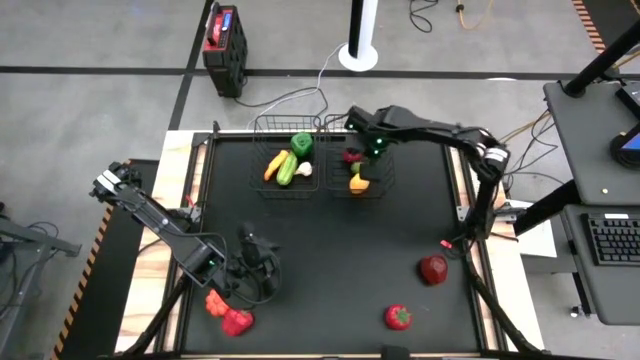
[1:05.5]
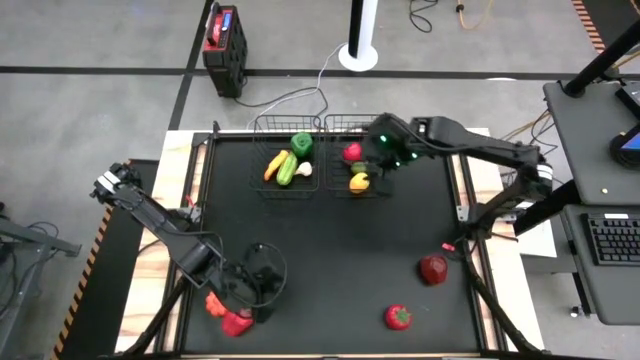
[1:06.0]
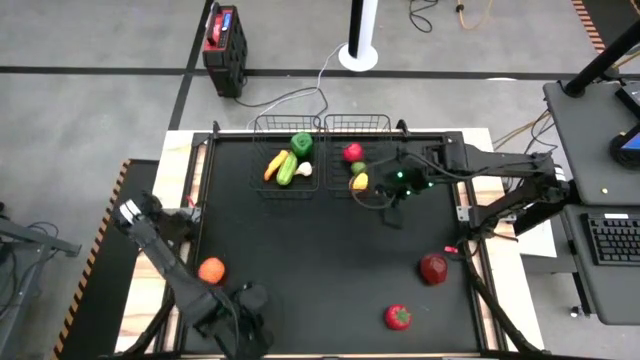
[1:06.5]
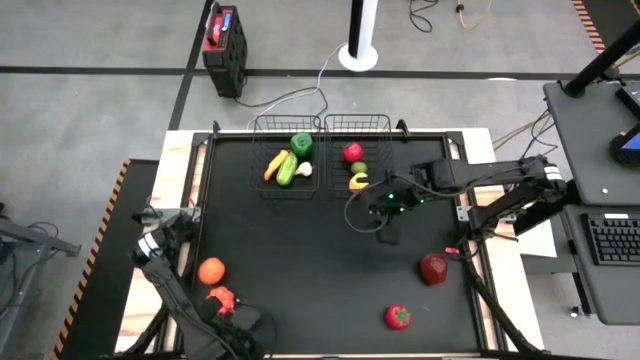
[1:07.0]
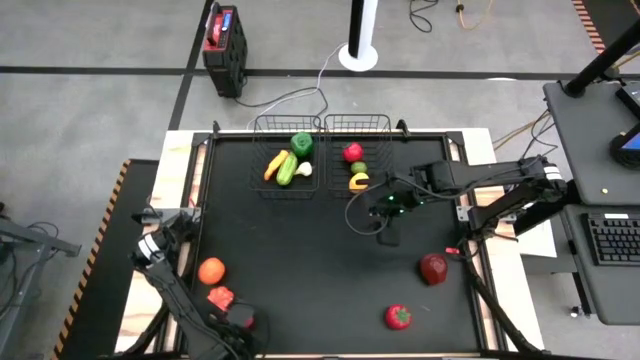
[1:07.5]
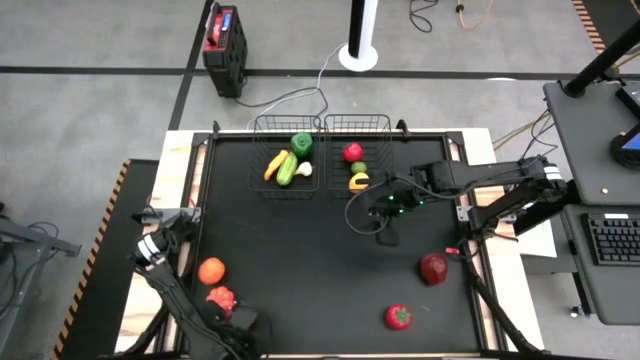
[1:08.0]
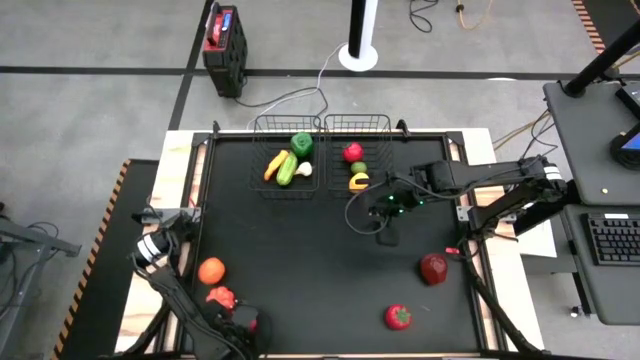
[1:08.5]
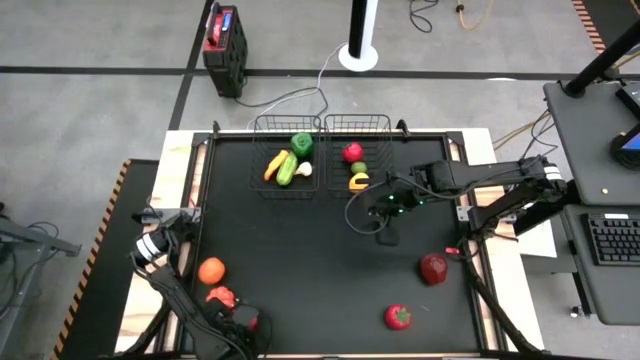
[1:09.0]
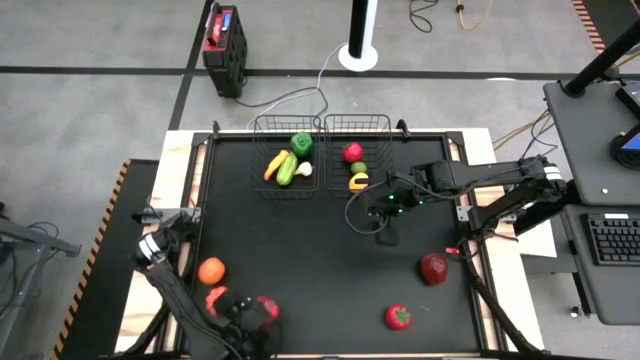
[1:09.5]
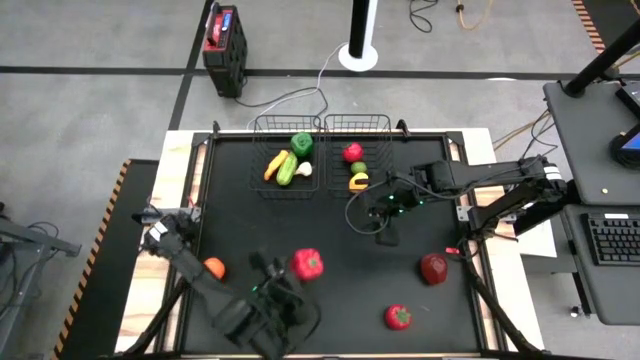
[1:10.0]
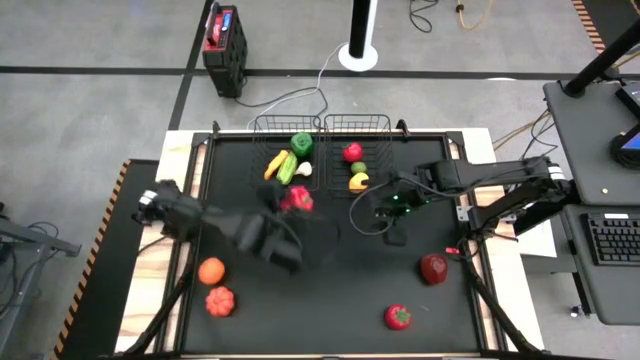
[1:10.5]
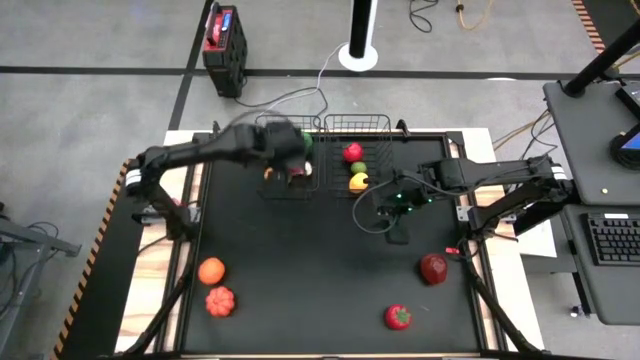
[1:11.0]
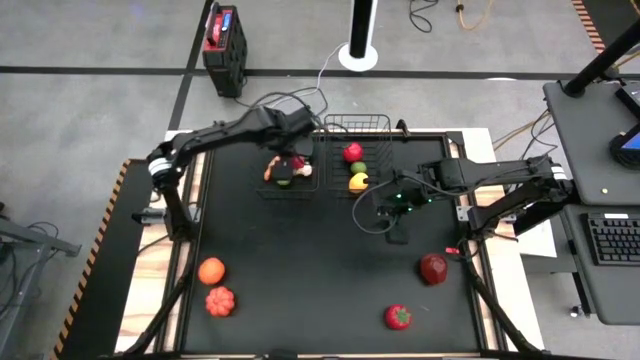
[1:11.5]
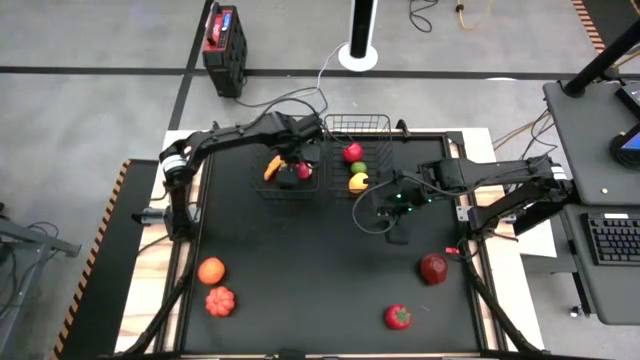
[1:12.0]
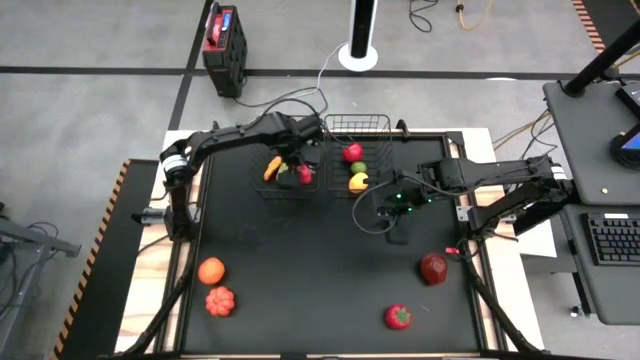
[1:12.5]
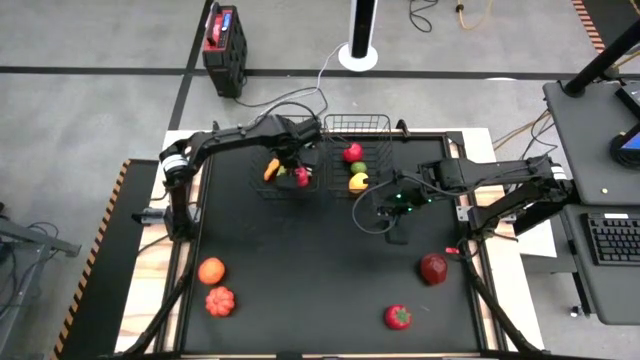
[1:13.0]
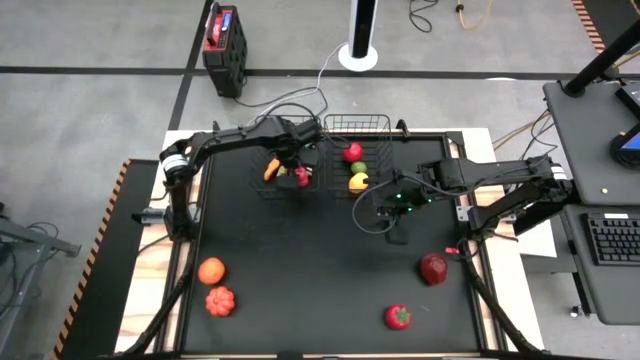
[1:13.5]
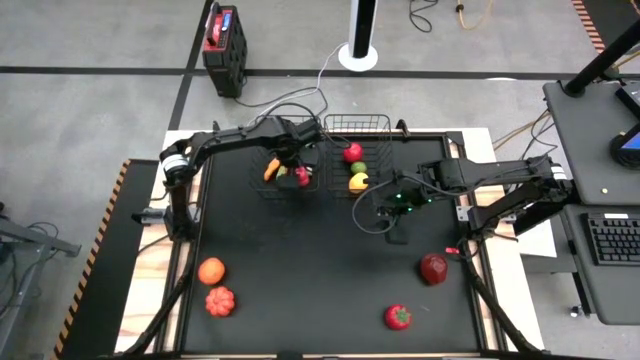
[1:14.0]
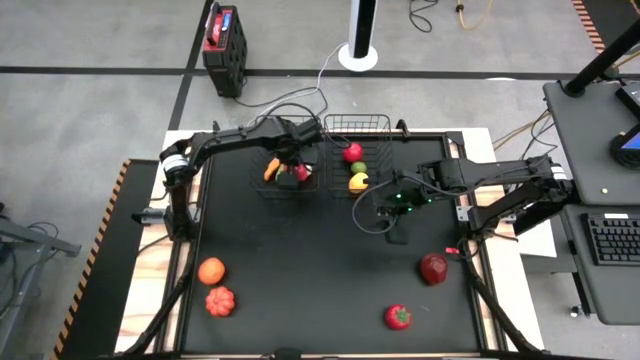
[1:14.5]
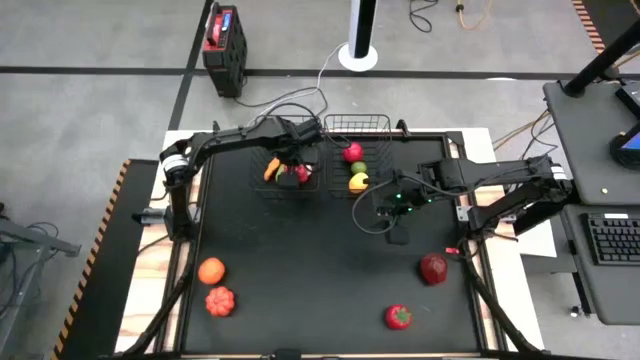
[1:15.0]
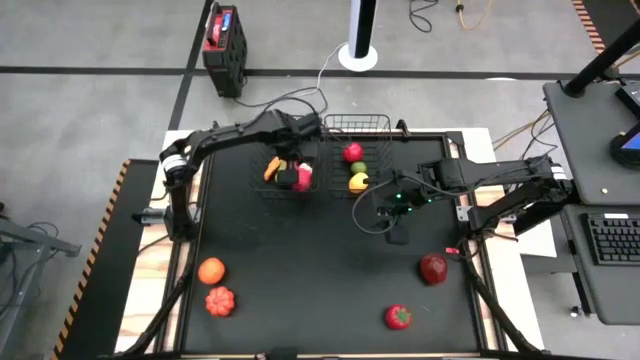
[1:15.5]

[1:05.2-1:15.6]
Task: Sort produce into baskets
Put the red bell pepper into the left wire basket

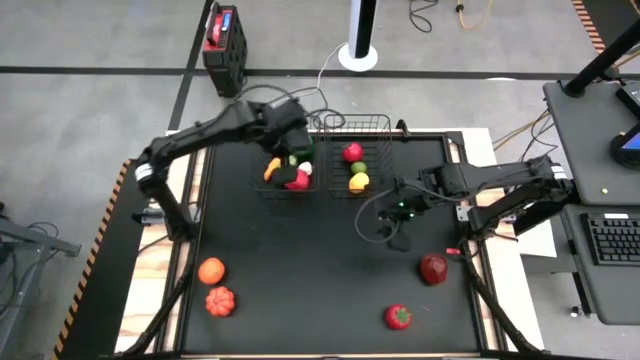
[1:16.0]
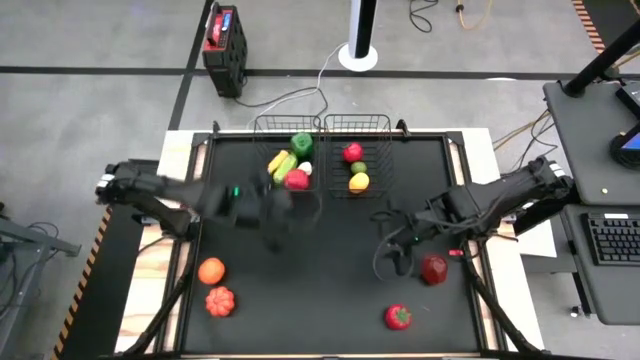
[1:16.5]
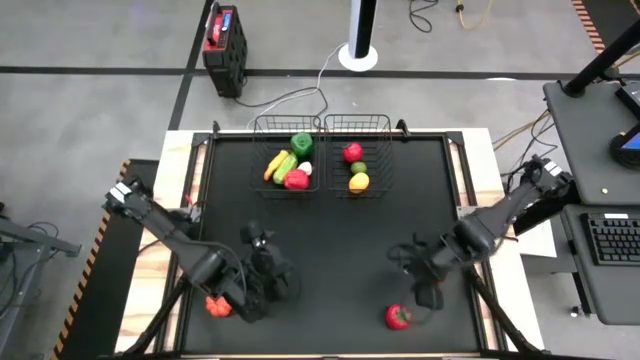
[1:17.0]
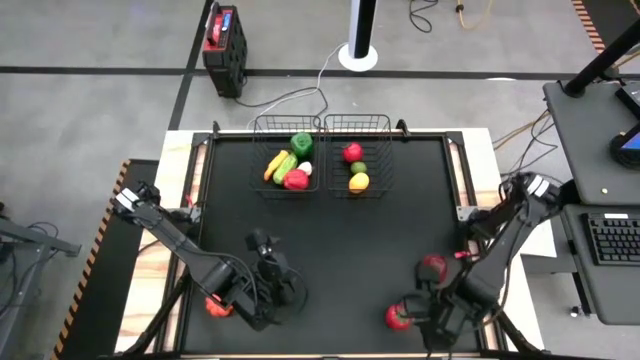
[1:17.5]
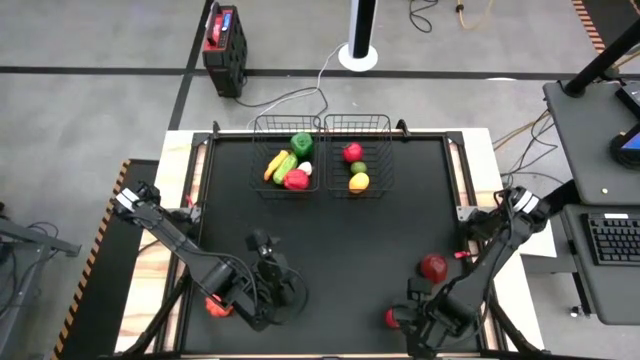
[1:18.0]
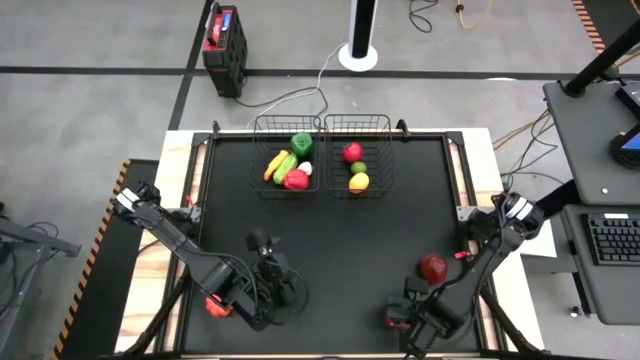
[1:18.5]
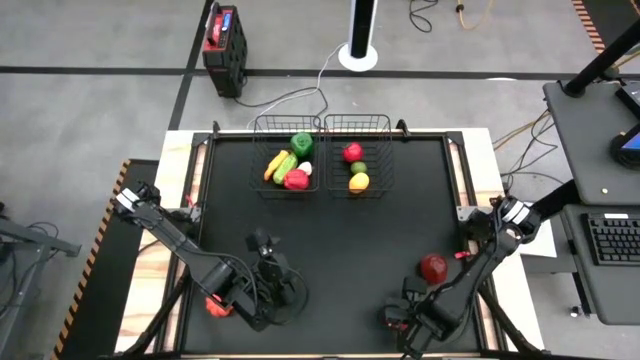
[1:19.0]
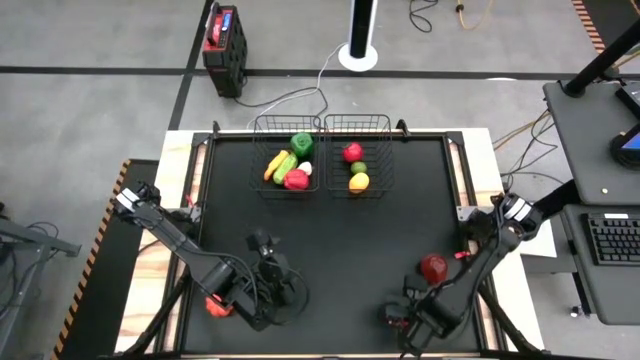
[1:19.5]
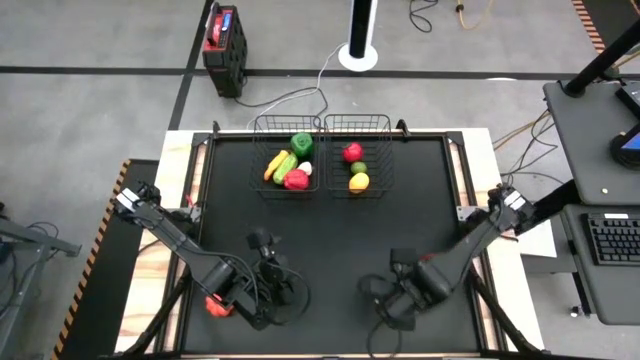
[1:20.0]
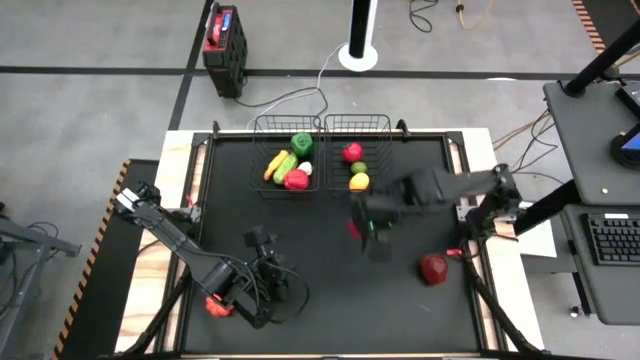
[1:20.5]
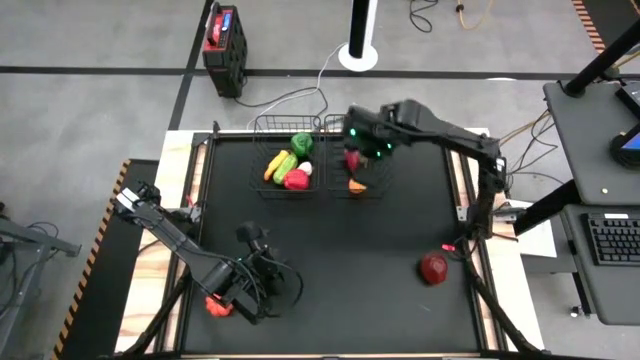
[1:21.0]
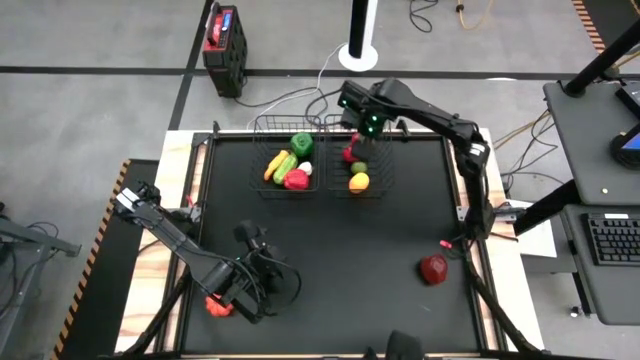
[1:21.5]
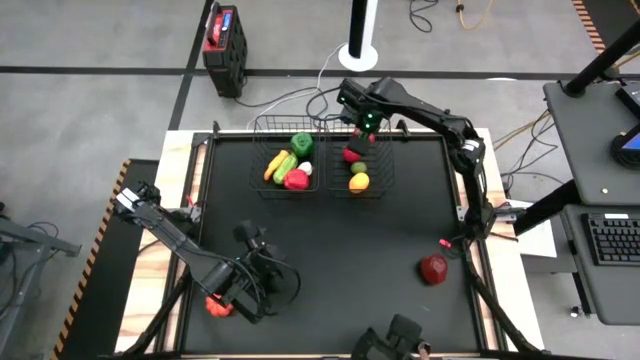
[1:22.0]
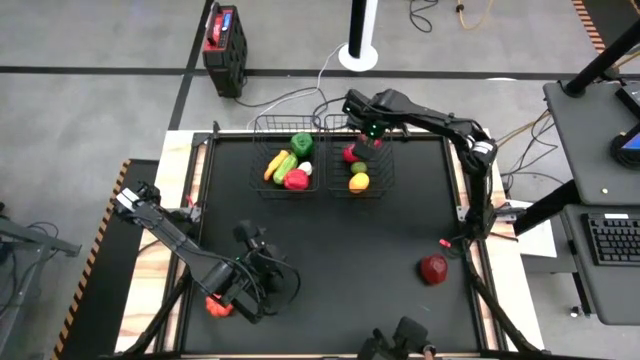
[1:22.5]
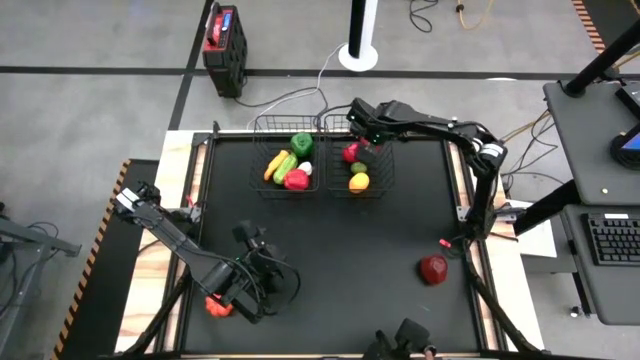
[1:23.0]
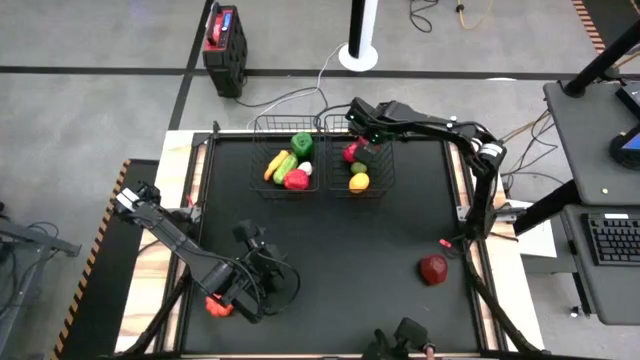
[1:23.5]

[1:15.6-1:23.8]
Put the tomato into the right wire basket

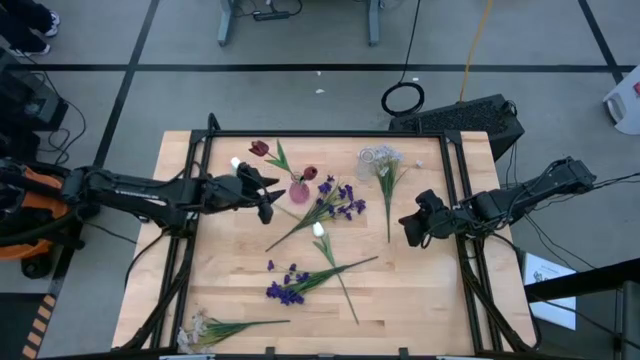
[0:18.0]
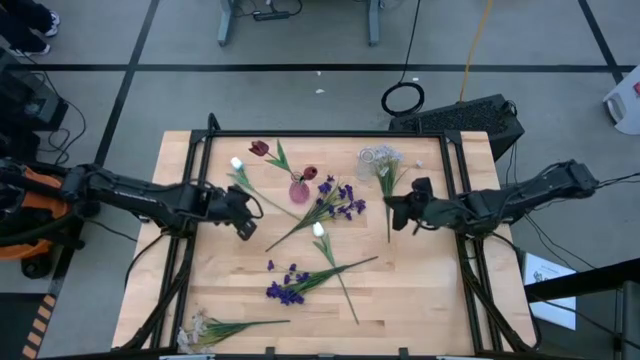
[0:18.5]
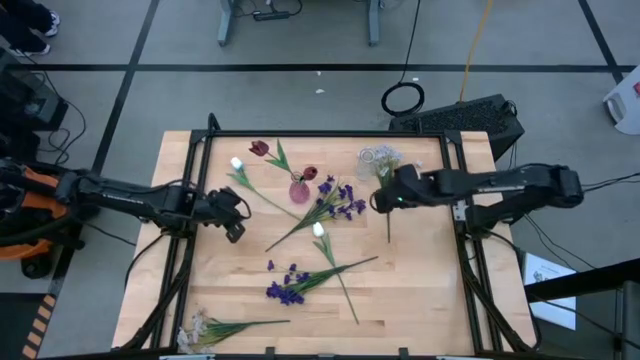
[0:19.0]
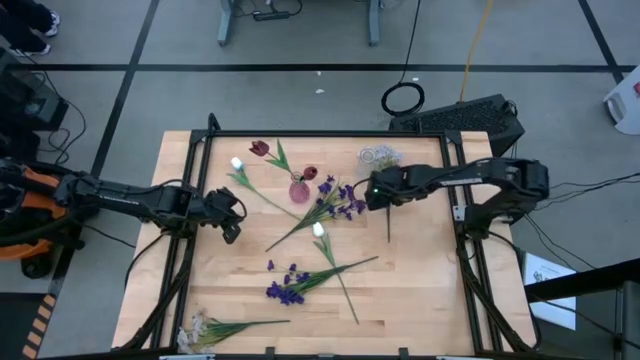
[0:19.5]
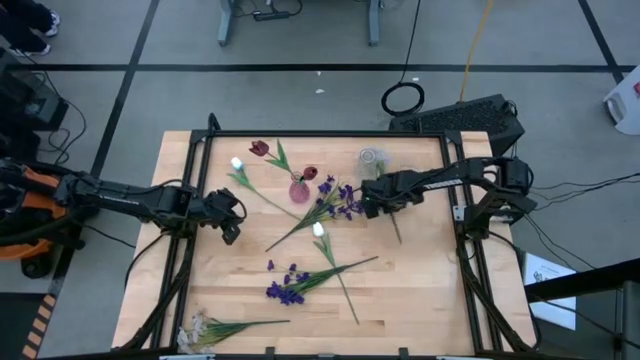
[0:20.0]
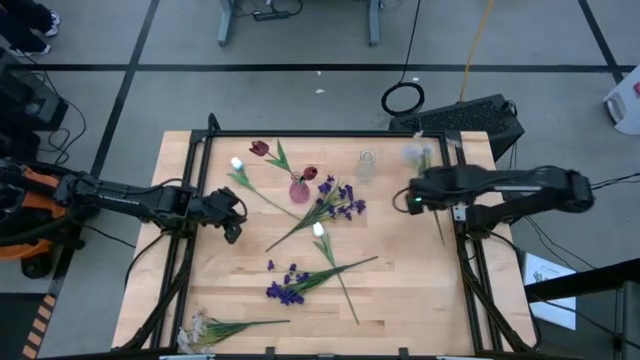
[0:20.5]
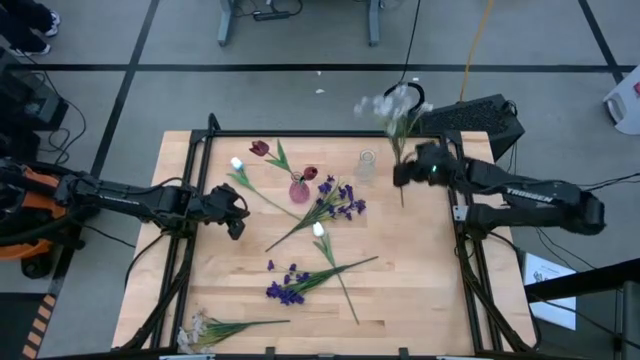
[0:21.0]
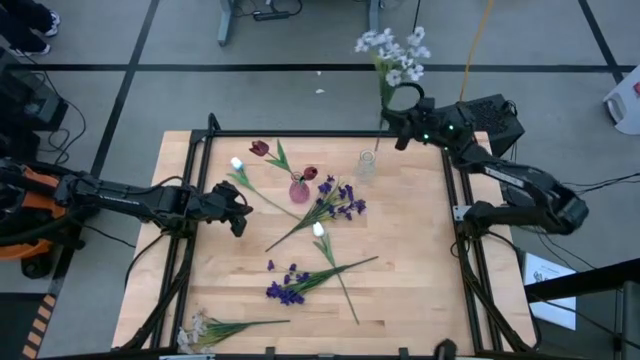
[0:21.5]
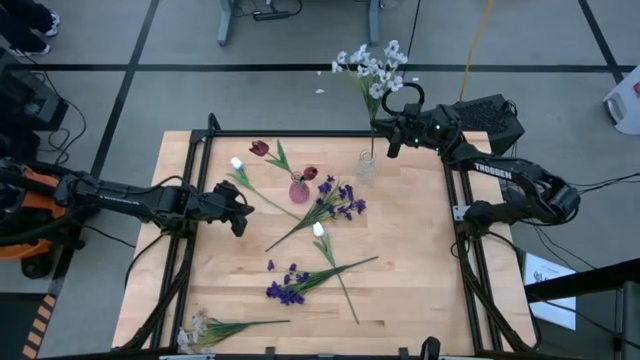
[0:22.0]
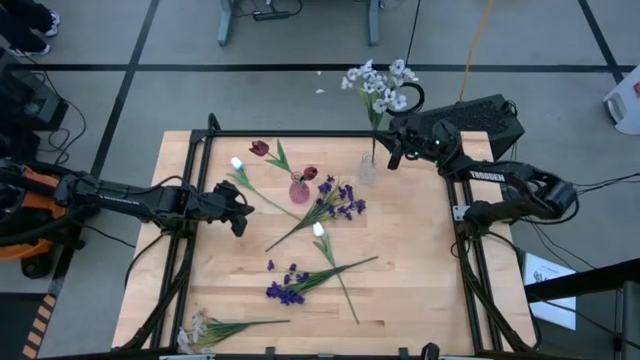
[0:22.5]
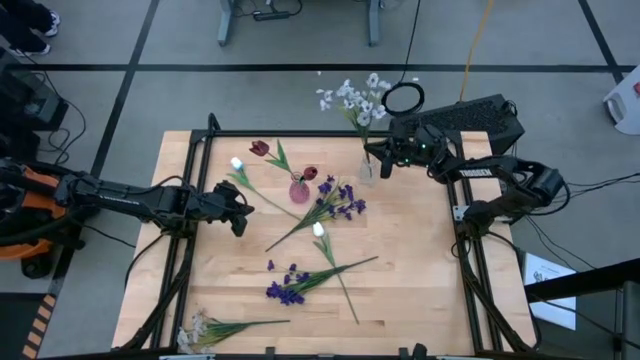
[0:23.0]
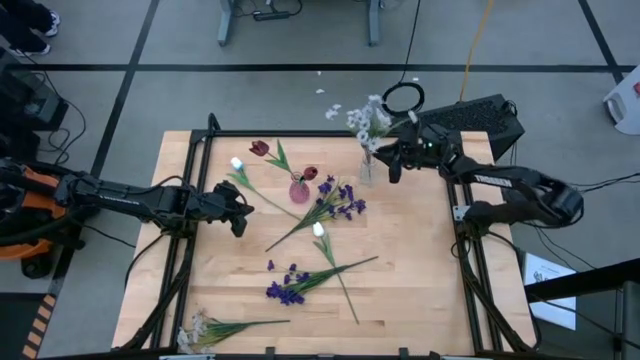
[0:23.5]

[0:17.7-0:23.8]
Task: Sort flowers into vase by color
Put the top right white flowers into the transparent vase
